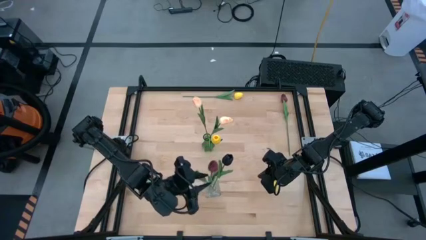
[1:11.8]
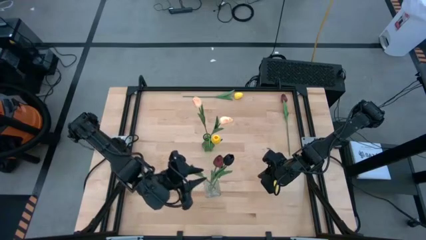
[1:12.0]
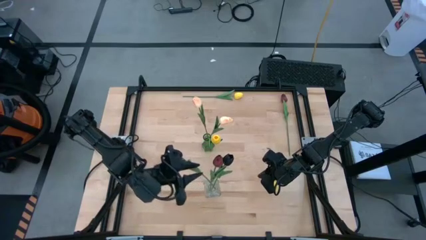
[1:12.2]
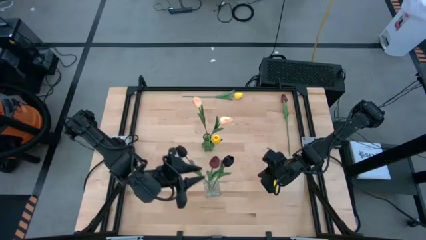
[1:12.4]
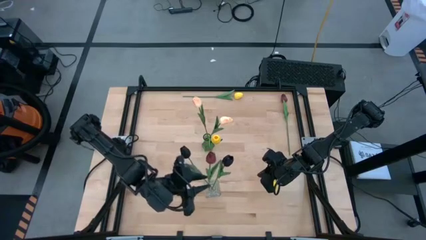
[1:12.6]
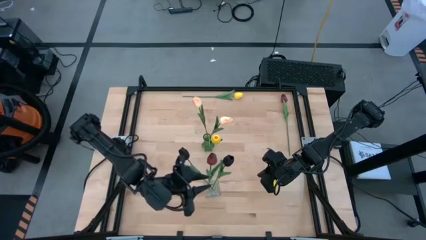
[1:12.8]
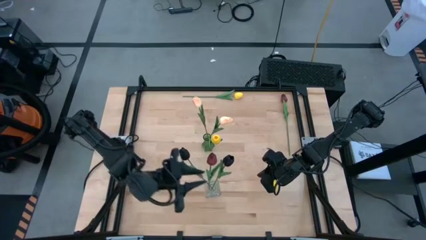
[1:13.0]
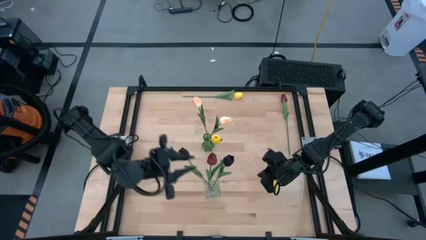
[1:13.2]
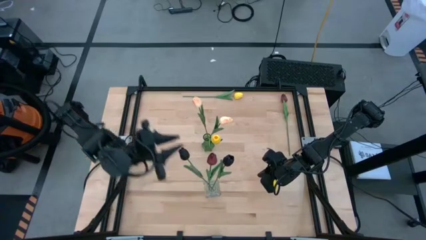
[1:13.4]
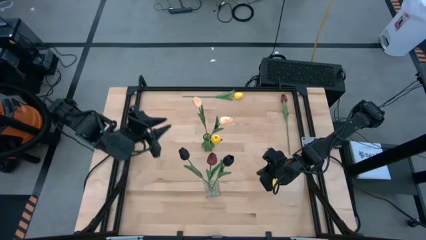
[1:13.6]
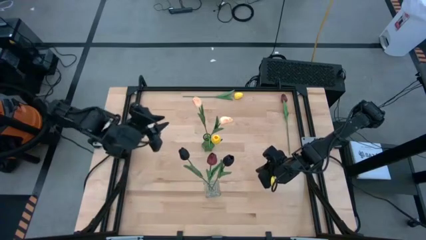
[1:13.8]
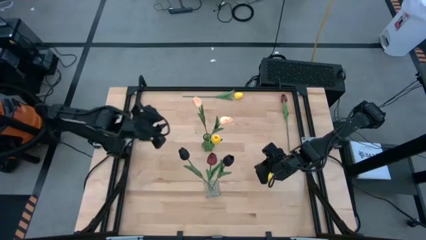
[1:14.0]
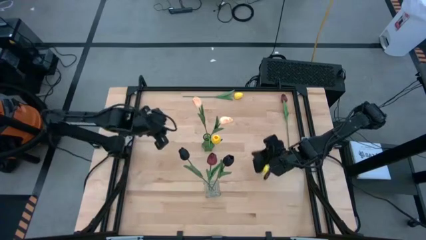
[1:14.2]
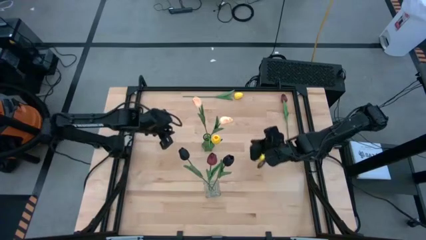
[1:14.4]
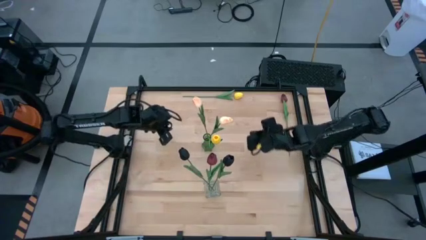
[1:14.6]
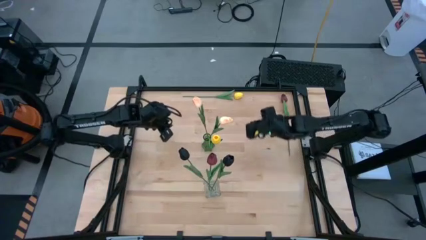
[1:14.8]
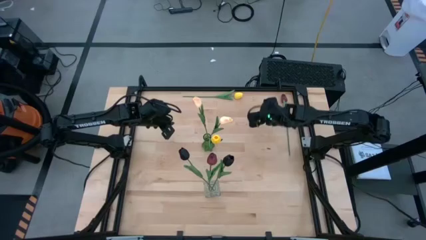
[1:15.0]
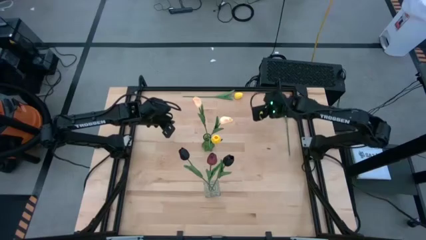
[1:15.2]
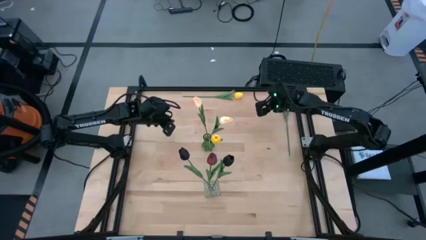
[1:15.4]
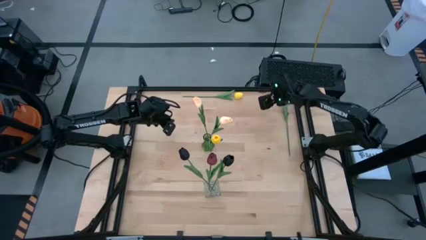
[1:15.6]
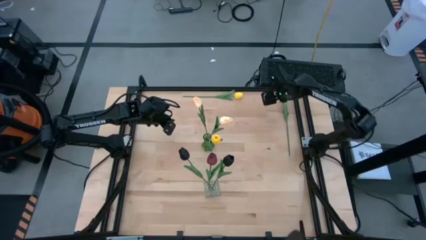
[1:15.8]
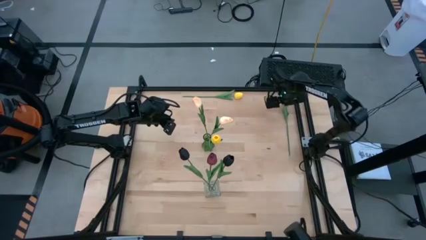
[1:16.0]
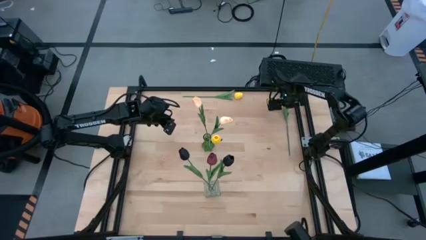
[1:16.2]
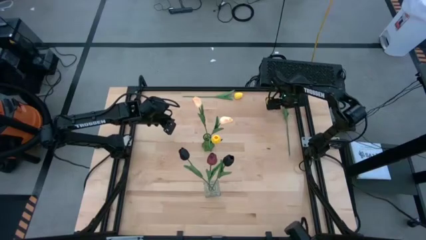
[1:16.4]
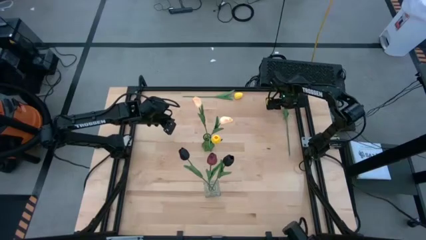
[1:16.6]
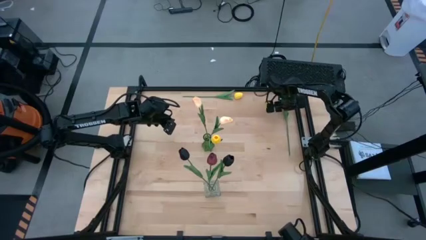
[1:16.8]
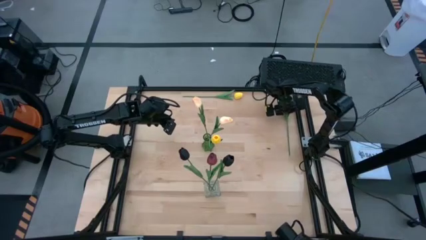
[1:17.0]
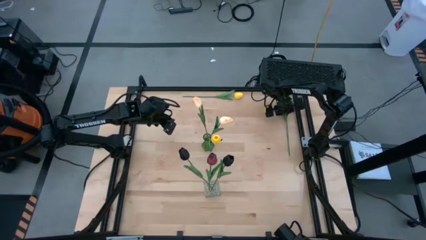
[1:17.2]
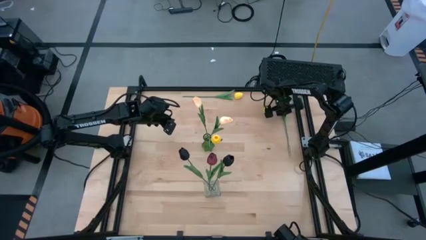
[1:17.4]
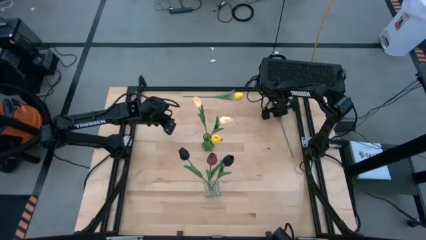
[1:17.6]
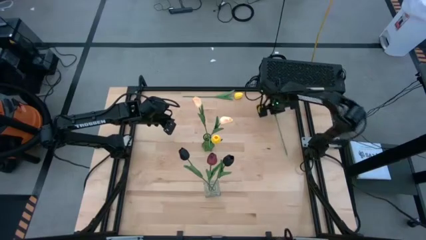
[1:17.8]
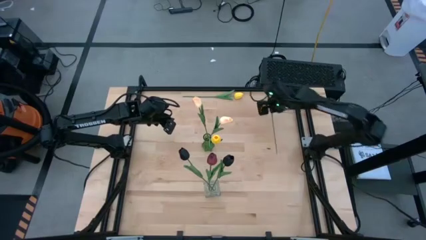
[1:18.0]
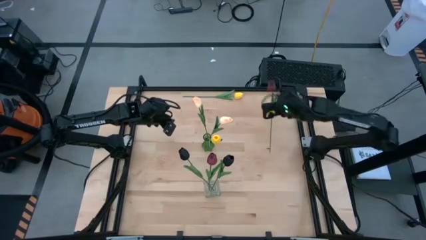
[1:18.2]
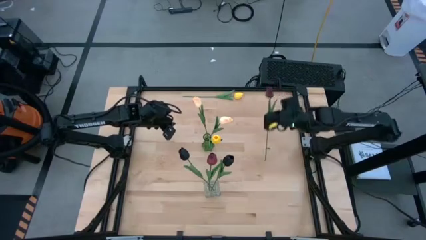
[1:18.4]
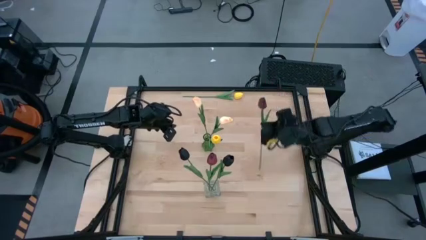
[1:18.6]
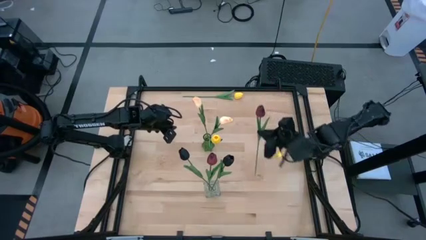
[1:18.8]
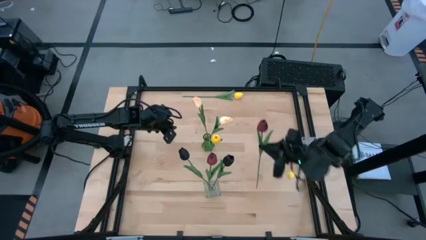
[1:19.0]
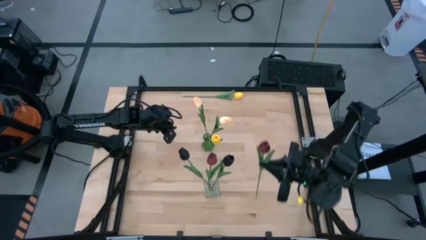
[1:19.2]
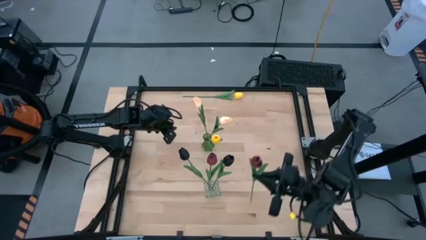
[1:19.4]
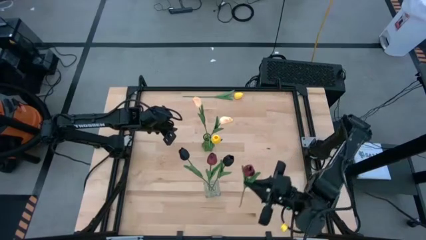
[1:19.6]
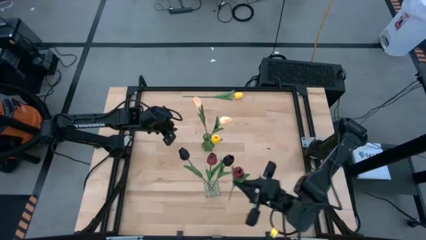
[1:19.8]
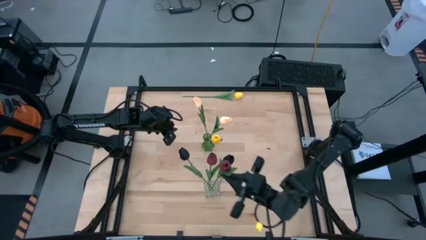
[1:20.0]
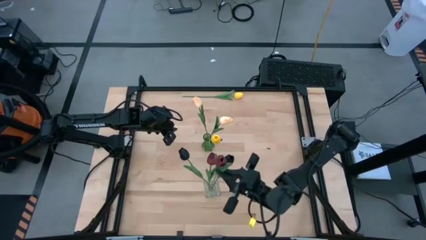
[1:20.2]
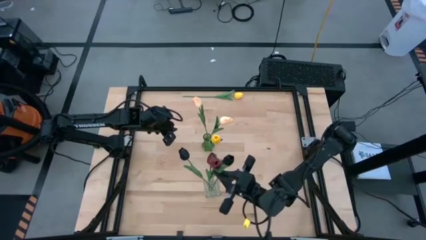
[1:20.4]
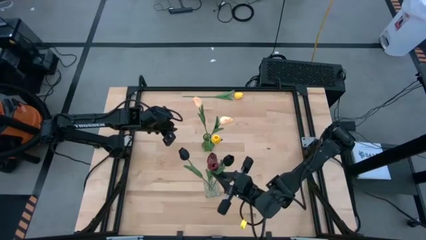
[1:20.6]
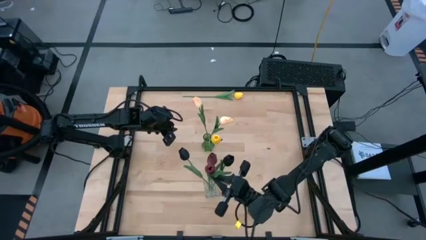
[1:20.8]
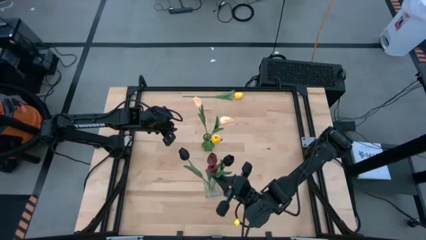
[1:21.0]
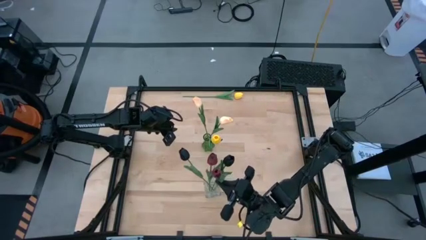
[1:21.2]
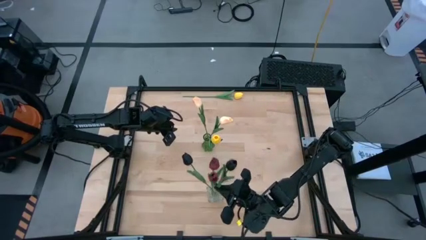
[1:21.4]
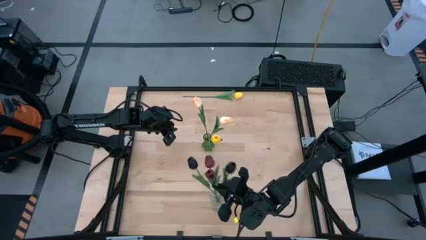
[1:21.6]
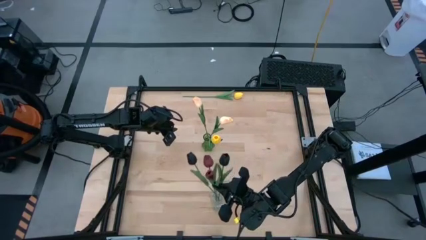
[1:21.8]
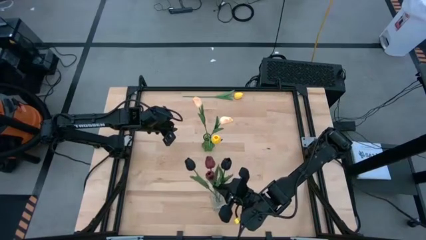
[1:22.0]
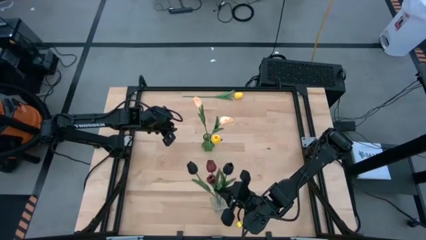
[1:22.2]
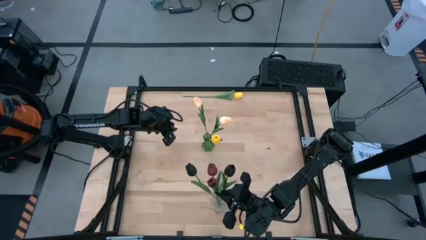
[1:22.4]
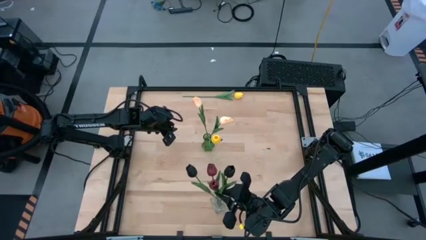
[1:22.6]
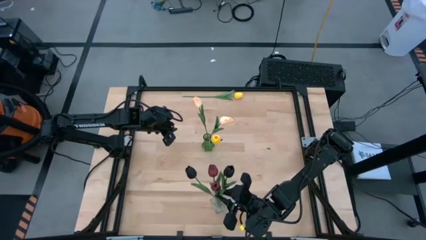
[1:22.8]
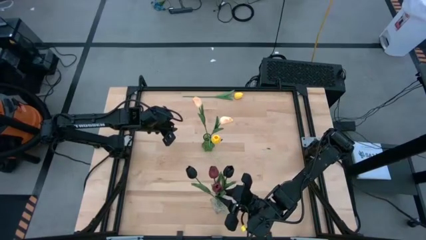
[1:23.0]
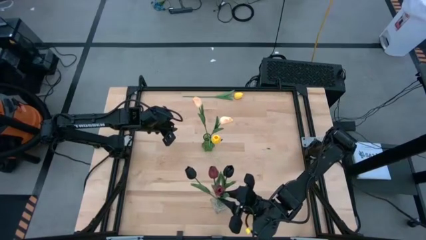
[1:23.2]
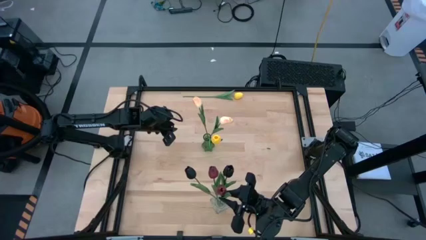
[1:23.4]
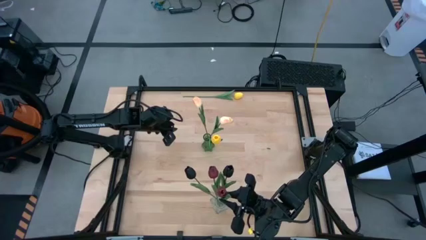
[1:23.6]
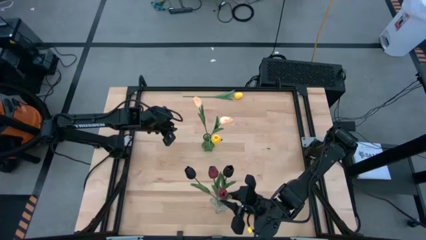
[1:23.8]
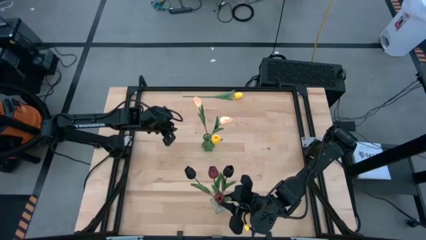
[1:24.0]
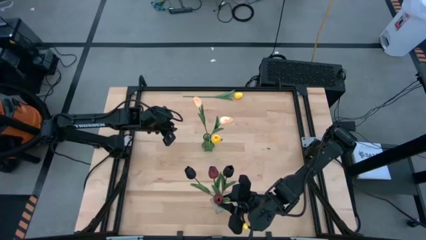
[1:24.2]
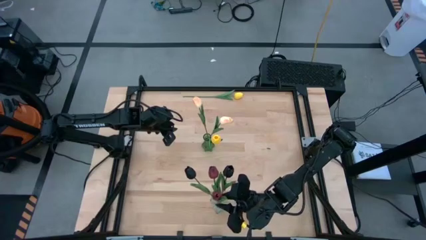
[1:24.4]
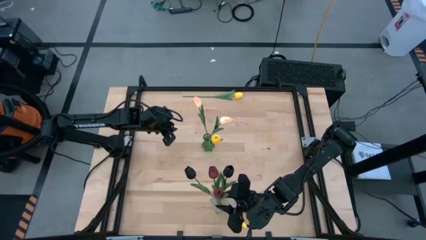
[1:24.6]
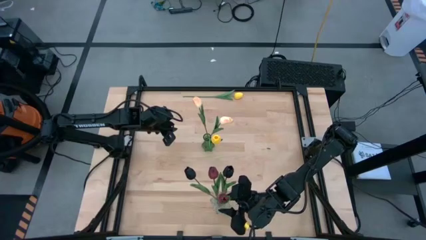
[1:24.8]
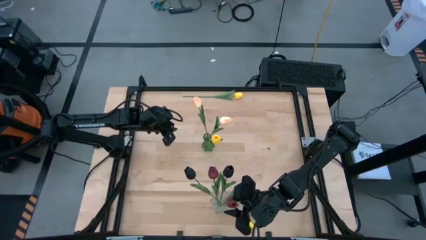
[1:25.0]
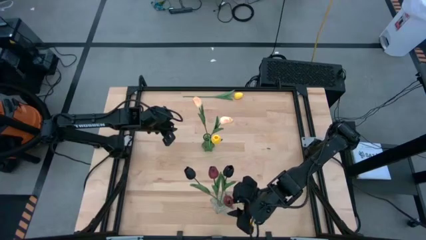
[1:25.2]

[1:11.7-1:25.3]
Task: Sort flowers into vase by color
Put the red flower into the transparent vase
